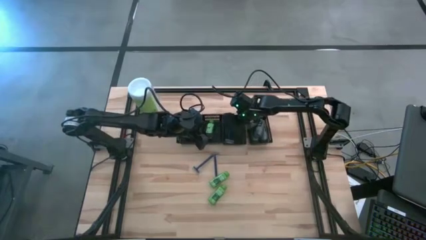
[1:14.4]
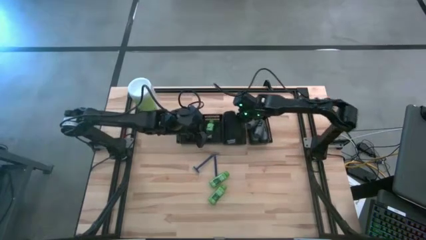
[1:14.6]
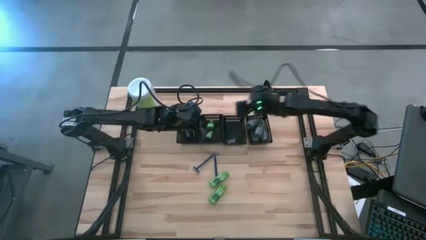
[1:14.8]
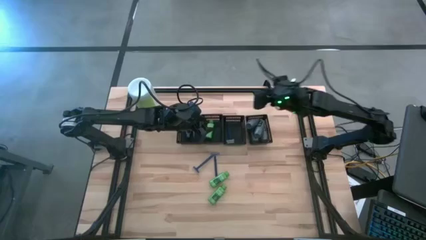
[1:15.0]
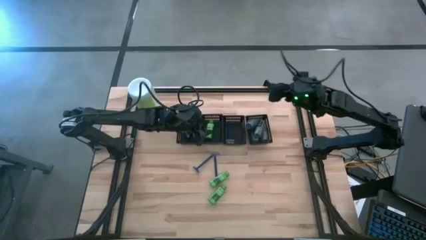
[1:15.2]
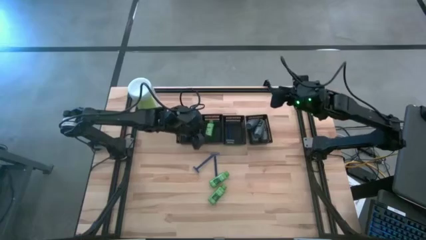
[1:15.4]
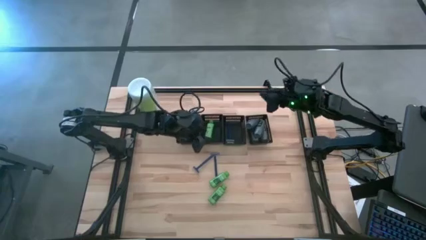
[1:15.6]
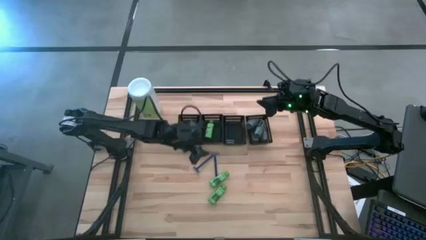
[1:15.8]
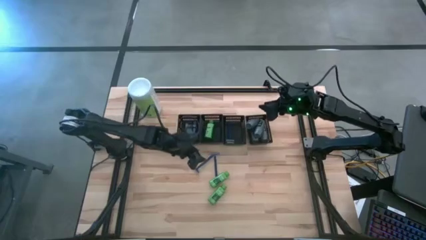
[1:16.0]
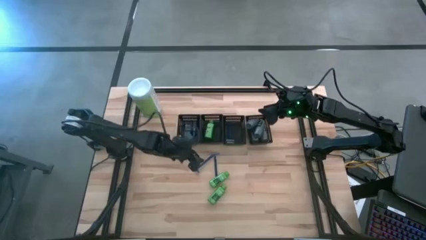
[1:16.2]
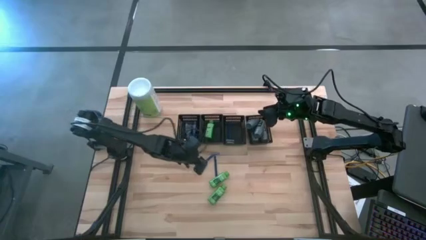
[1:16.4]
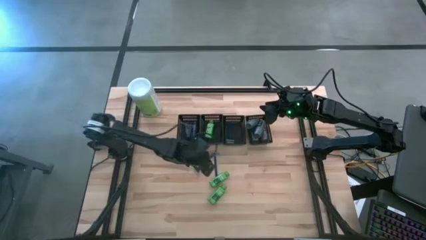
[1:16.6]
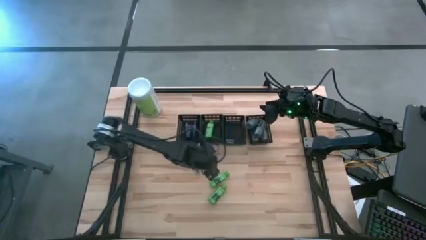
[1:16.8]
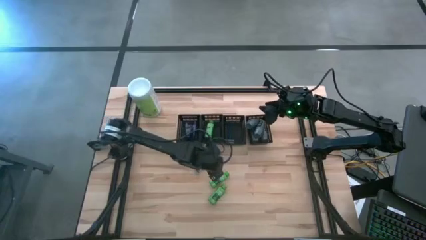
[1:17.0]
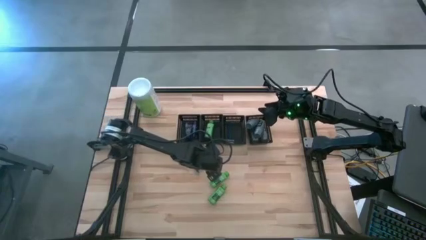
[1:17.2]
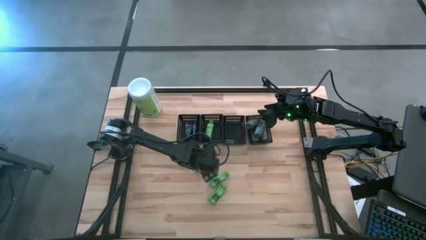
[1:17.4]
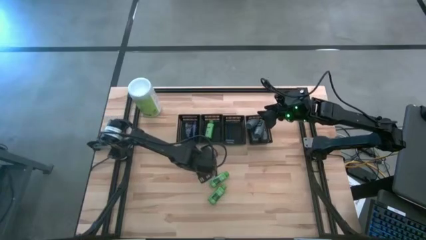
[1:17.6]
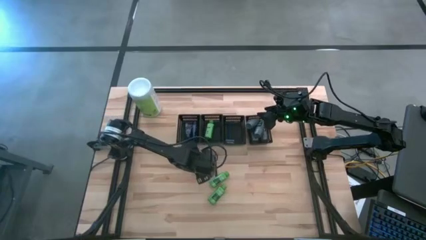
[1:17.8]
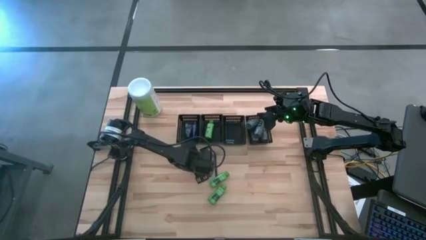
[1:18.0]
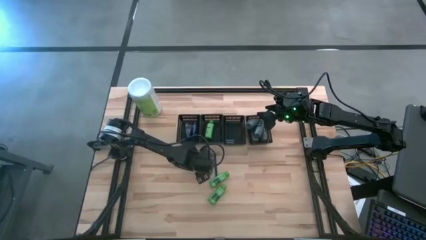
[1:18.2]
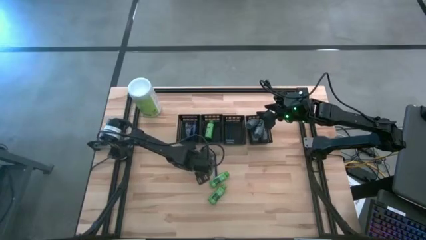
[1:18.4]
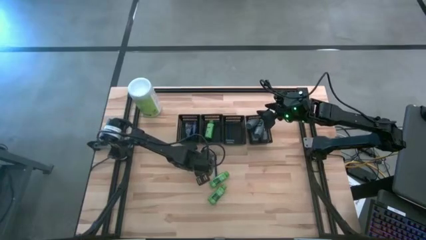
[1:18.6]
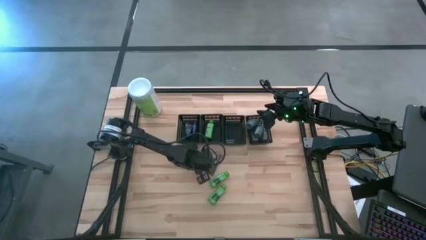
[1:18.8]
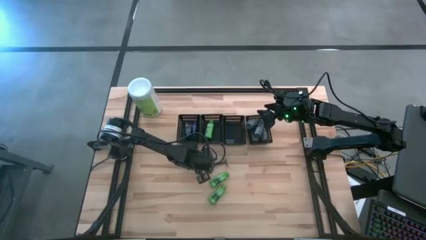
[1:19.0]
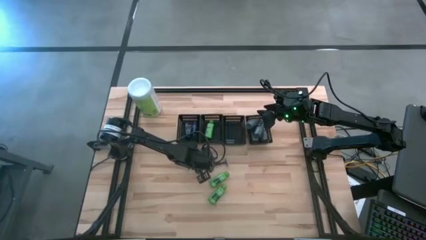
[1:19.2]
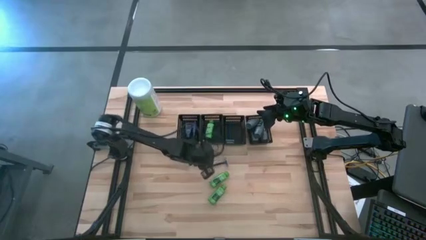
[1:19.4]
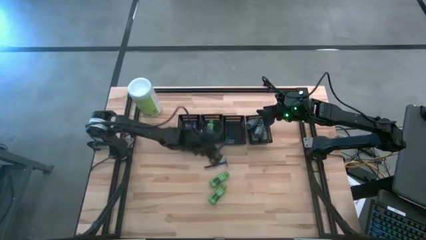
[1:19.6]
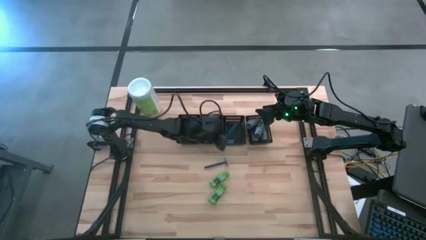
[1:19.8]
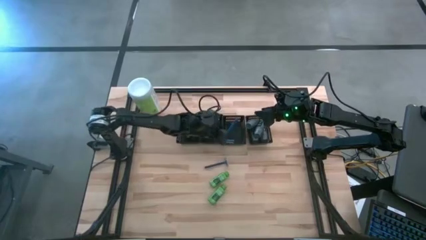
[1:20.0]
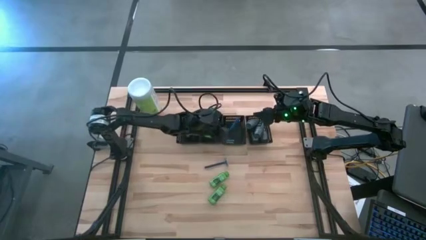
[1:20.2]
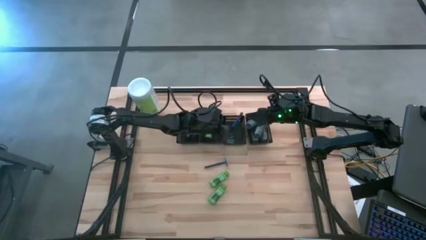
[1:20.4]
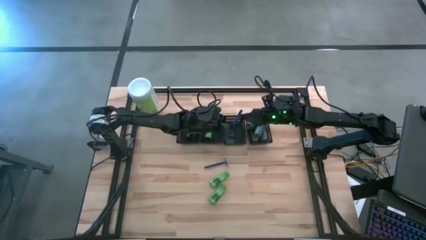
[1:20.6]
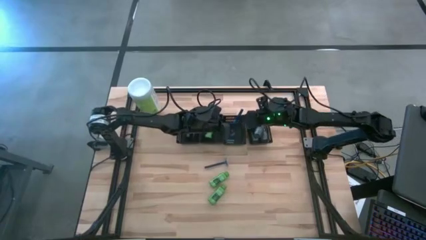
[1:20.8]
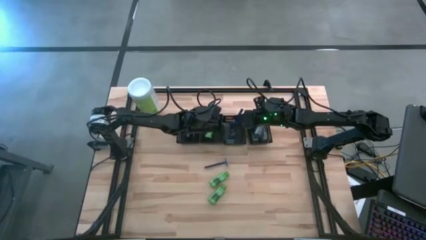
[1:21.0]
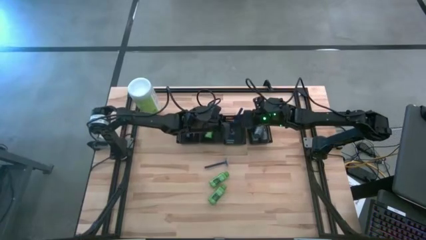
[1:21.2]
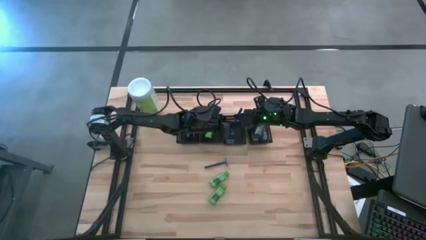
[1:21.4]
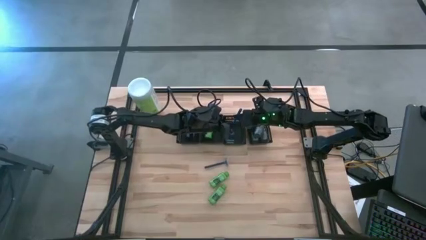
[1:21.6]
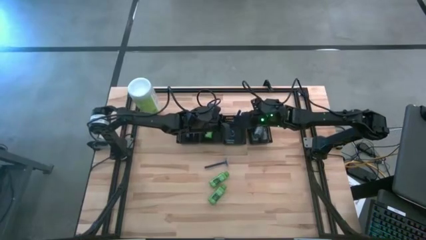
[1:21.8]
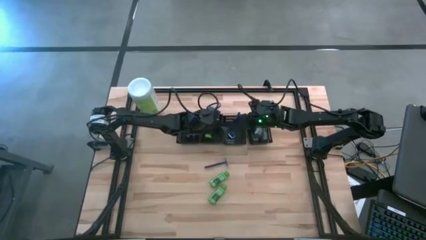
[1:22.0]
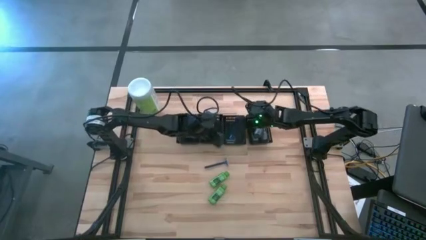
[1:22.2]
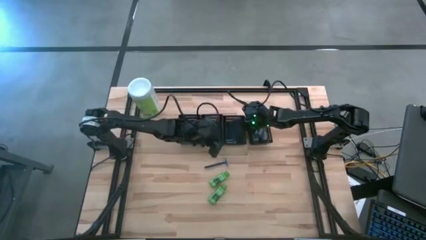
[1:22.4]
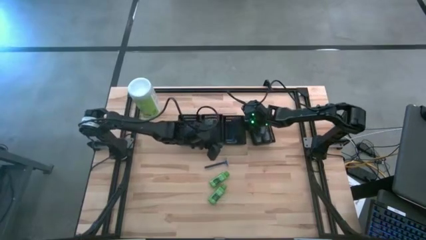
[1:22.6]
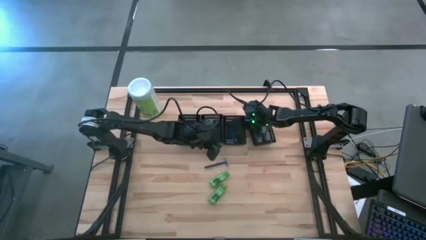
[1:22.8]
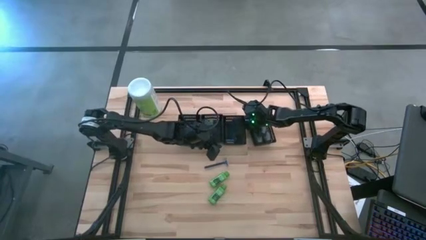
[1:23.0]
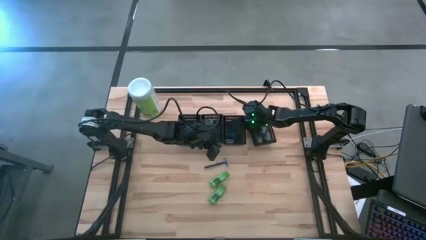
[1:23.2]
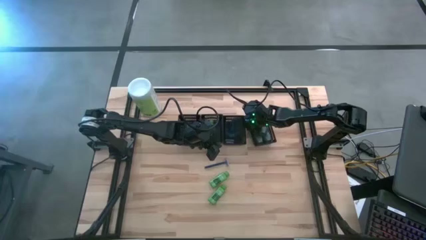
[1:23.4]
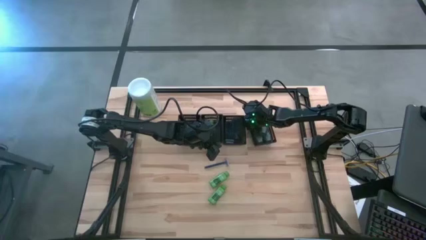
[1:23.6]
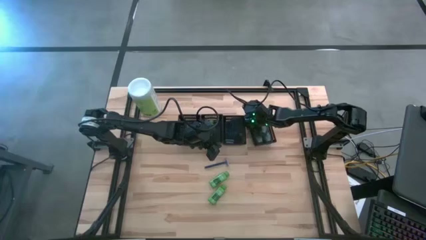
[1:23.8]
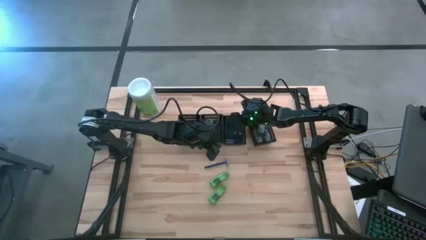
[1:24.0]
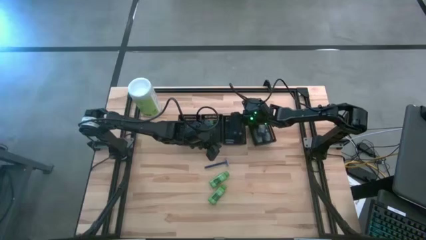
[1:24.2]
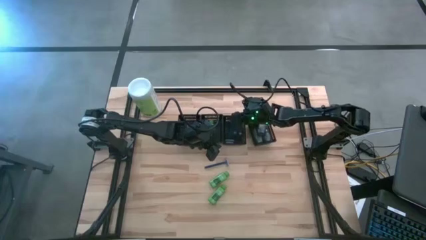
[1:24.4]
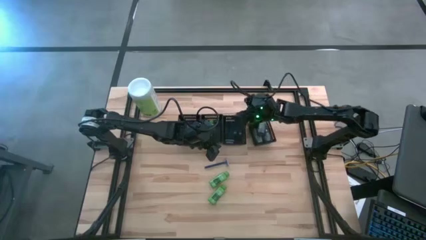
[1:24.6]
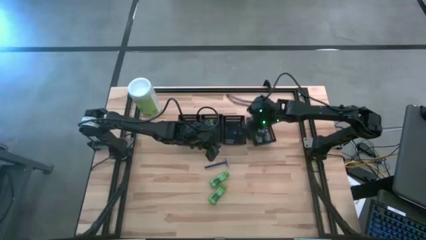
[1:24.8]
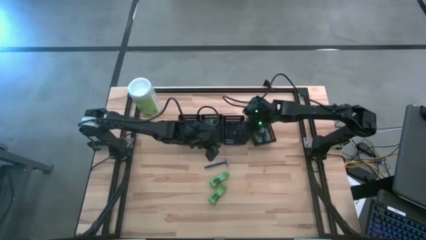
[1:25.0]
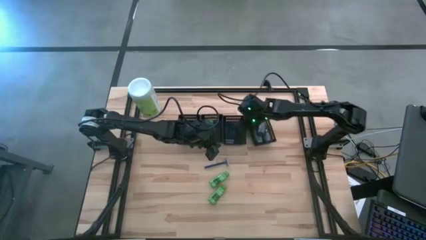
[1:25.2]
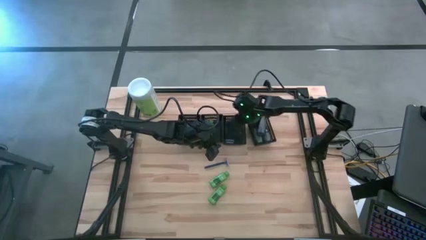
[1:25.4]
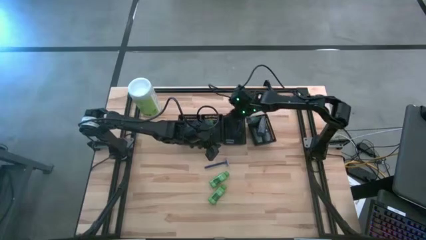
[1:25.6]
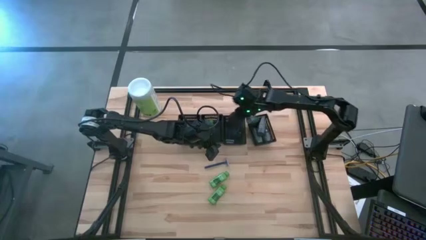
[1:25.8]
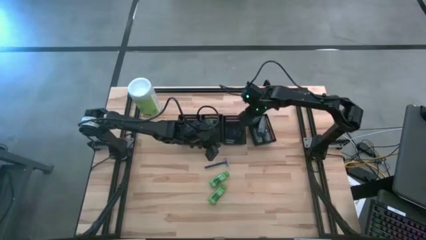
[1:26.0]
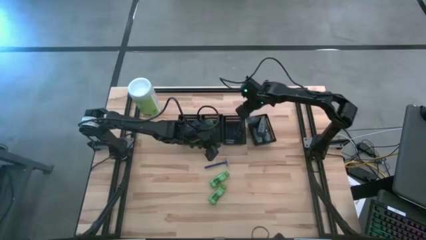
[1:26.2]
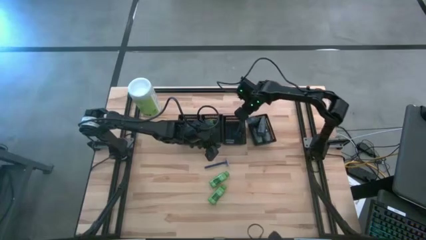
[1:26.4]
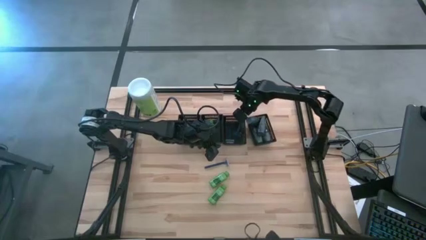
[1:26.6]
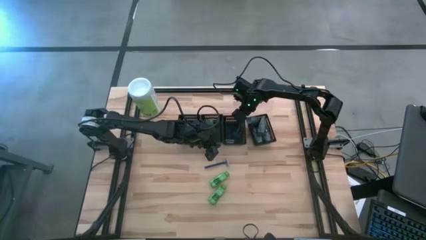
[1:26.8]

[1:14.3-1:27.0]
Task: Pick & Place Travel size toiletries
Put the blue razor into the middle right black bin

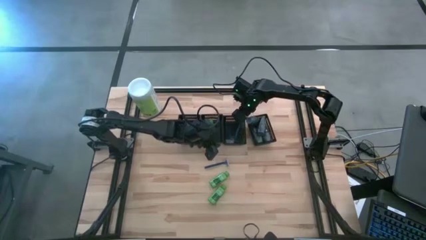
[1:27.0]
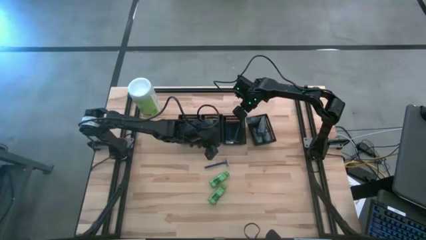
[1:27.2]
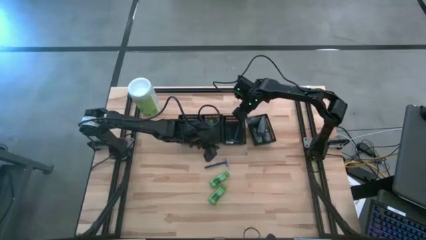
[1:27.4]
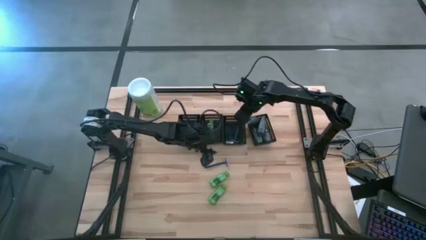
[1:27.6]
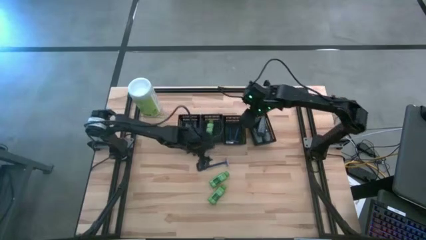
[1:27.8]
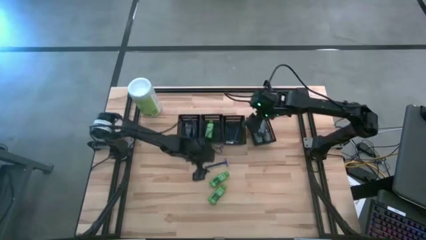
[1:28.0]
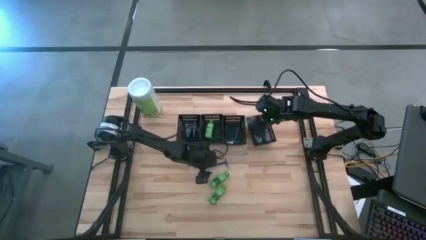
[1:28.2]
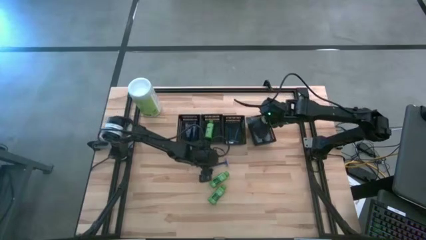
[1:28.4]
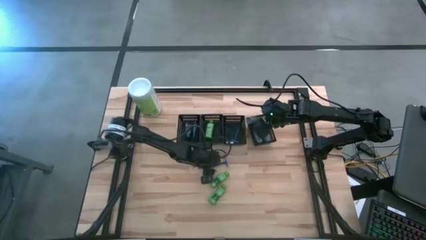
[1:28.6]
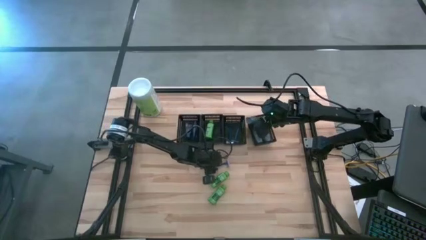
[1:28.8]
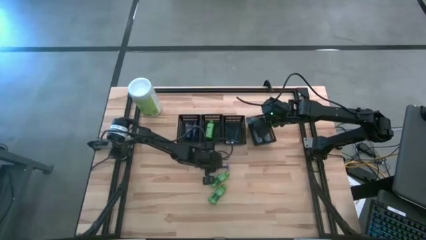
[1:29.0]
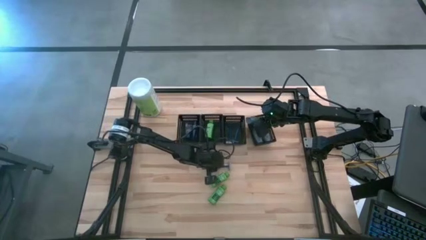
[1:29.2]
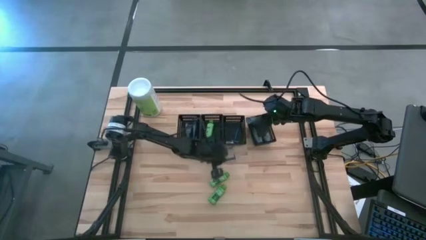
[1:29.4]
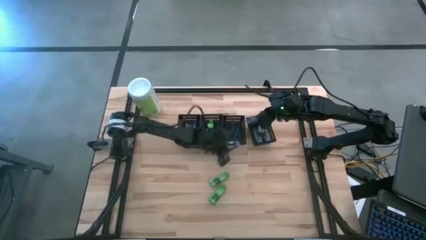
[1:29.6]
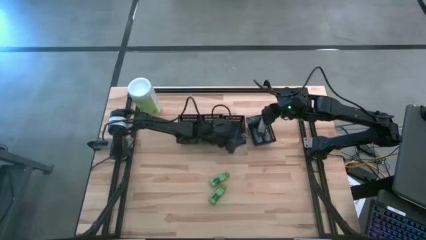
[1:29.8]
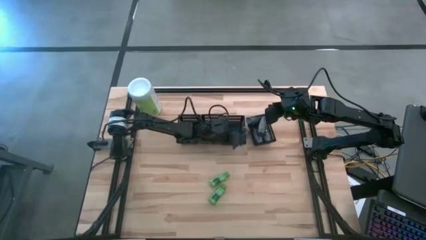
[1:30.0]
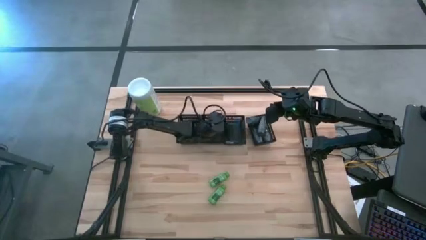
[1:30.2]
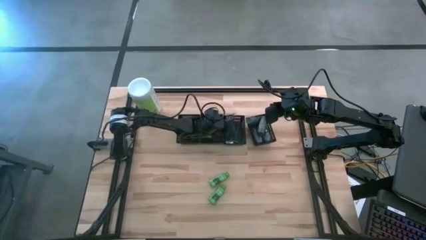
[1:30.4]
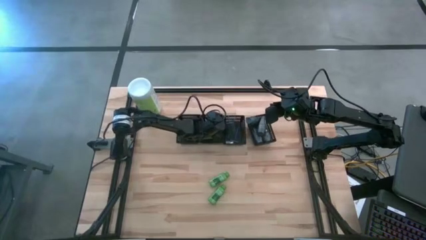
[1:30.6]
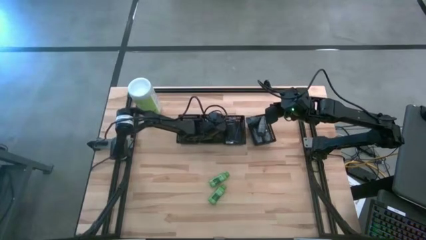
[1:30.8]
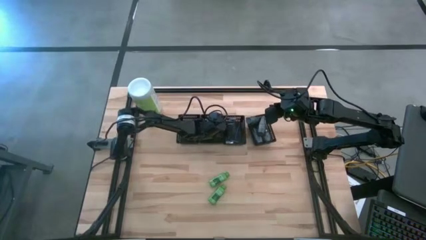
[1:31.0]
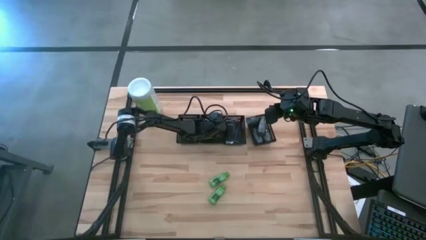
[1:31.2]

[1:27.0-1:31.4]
Put the blue razor into the middle right black bin
